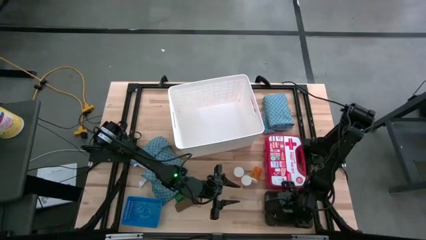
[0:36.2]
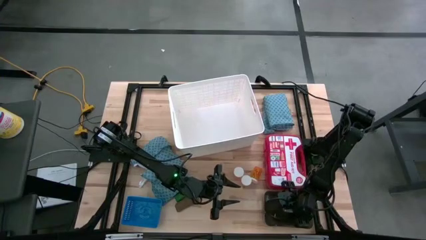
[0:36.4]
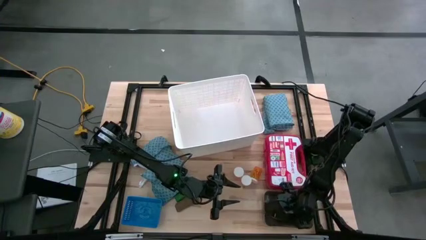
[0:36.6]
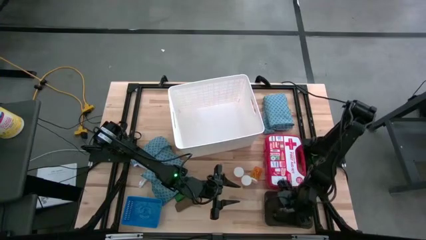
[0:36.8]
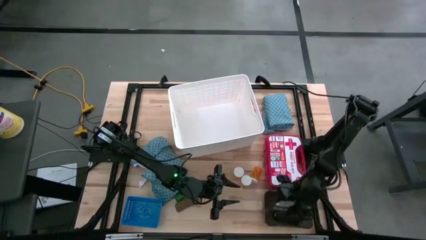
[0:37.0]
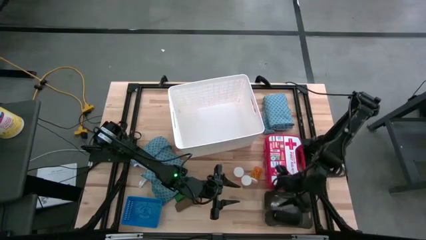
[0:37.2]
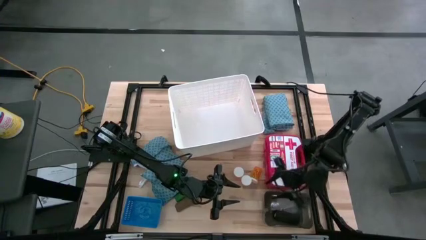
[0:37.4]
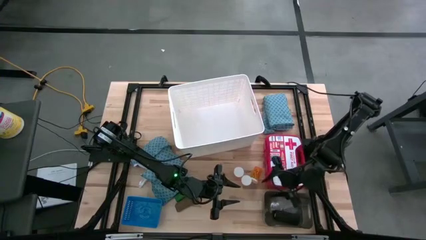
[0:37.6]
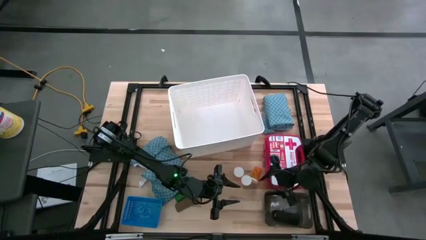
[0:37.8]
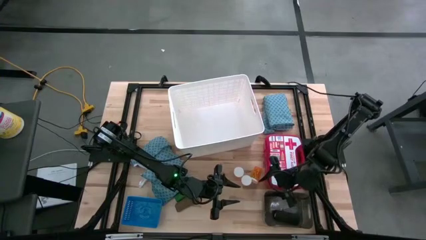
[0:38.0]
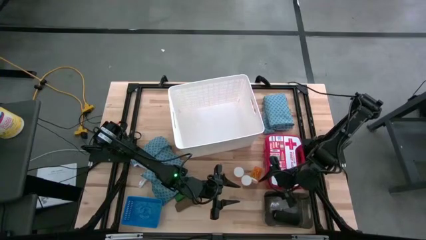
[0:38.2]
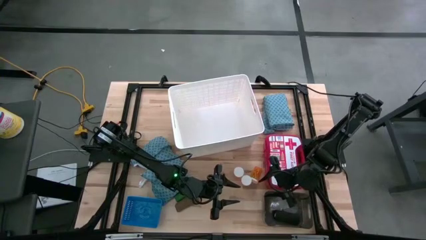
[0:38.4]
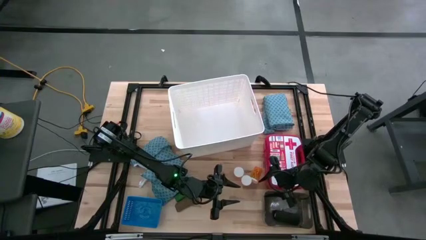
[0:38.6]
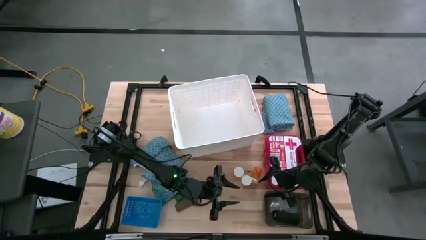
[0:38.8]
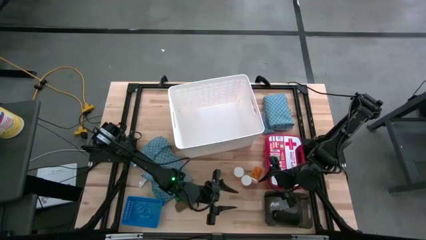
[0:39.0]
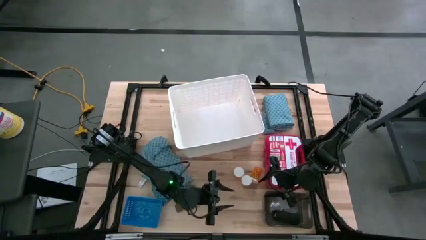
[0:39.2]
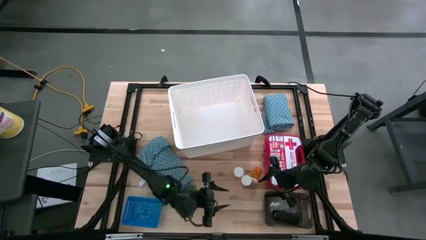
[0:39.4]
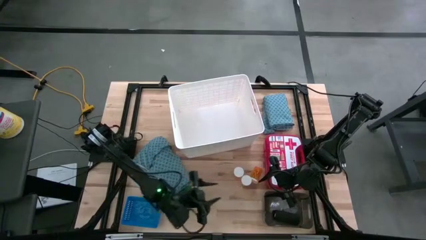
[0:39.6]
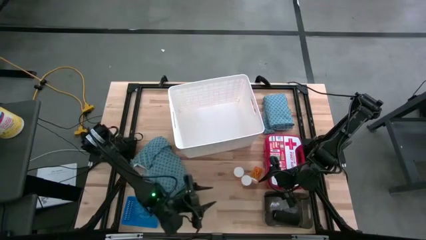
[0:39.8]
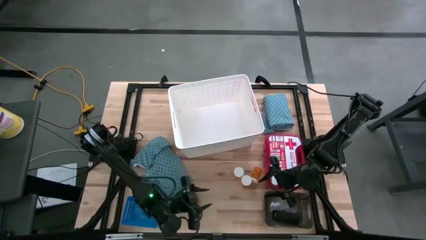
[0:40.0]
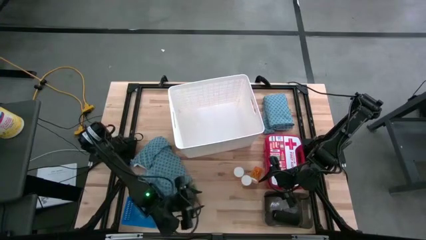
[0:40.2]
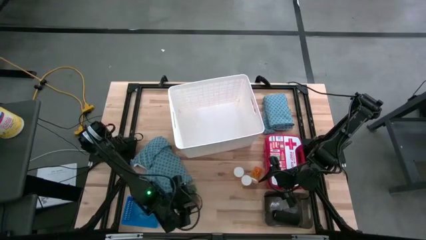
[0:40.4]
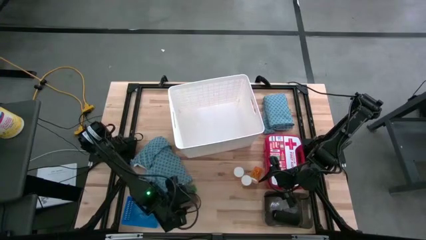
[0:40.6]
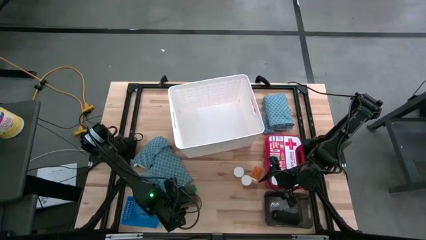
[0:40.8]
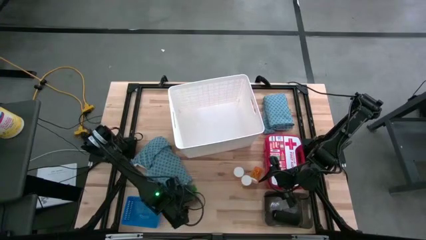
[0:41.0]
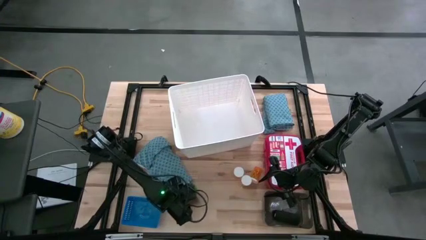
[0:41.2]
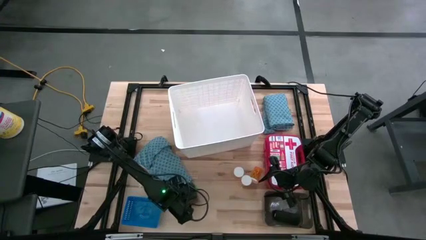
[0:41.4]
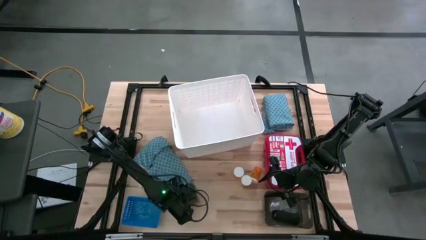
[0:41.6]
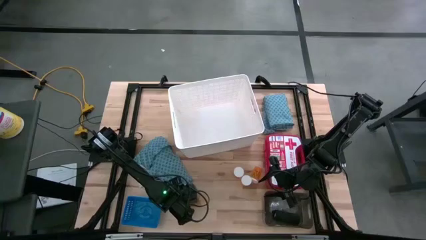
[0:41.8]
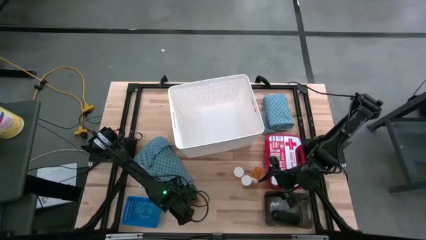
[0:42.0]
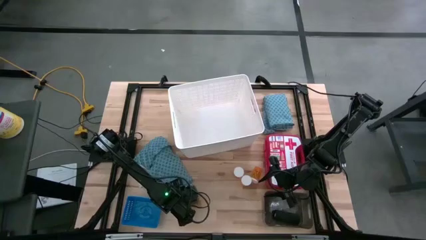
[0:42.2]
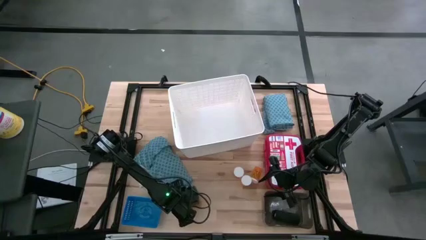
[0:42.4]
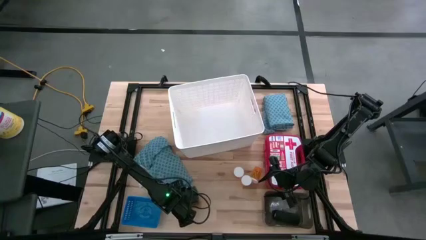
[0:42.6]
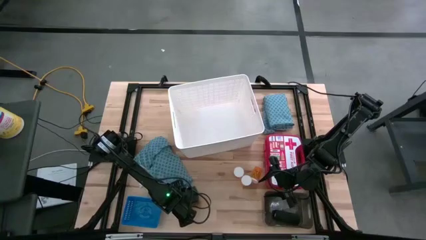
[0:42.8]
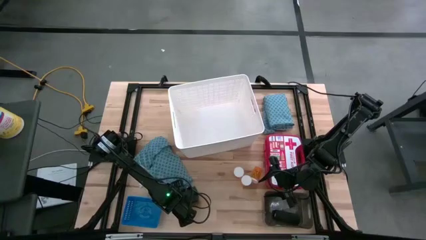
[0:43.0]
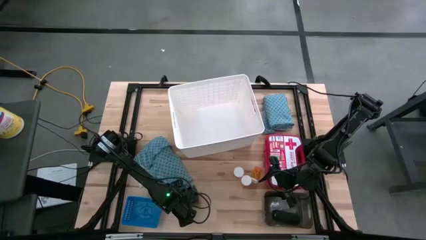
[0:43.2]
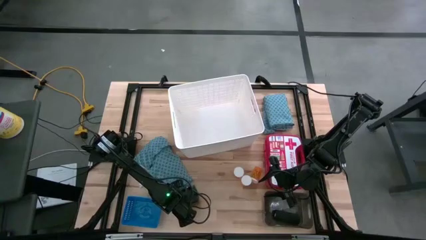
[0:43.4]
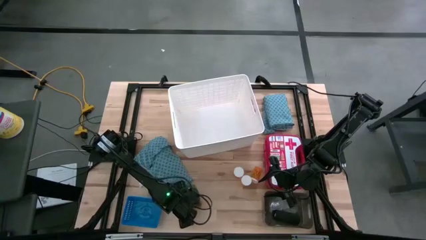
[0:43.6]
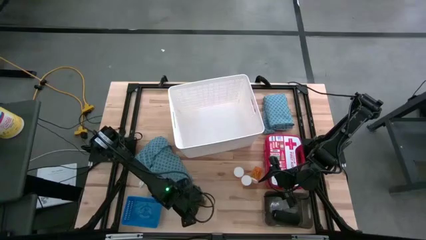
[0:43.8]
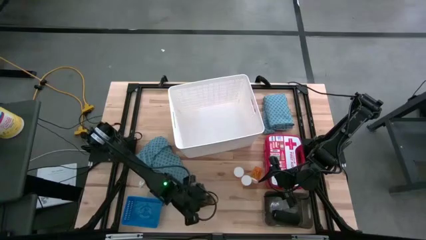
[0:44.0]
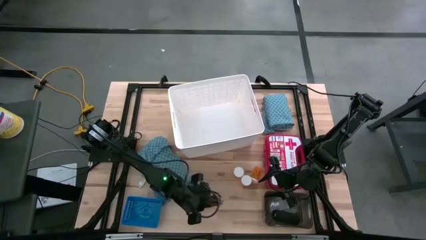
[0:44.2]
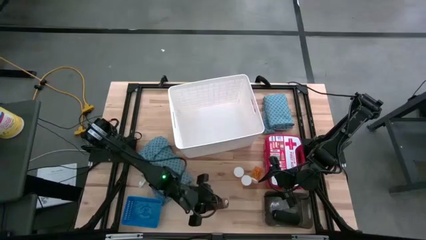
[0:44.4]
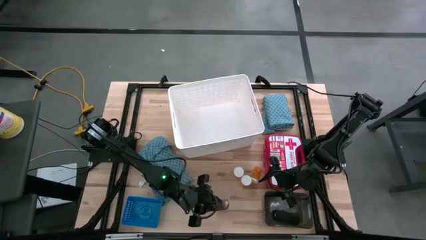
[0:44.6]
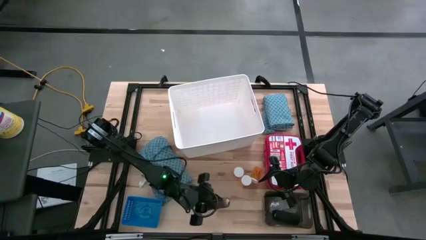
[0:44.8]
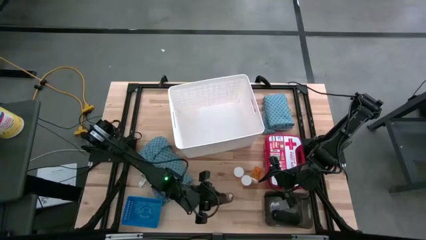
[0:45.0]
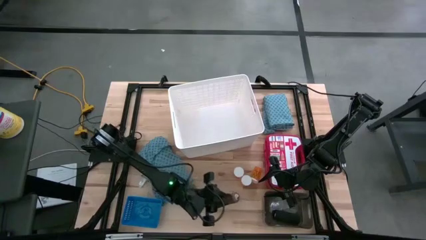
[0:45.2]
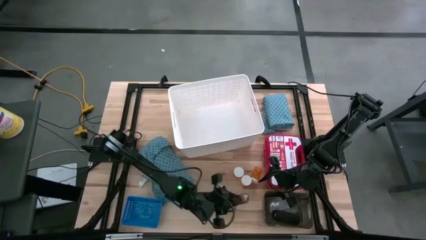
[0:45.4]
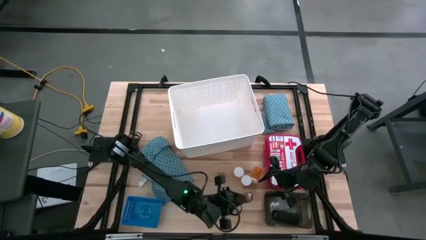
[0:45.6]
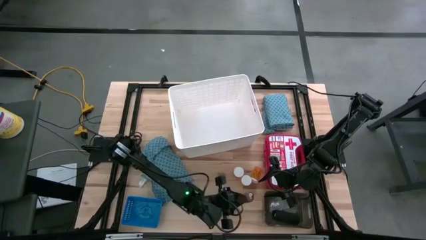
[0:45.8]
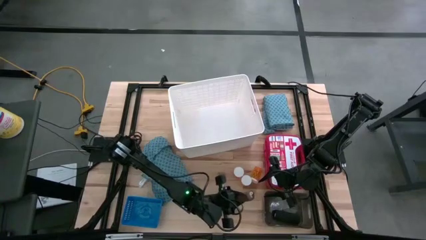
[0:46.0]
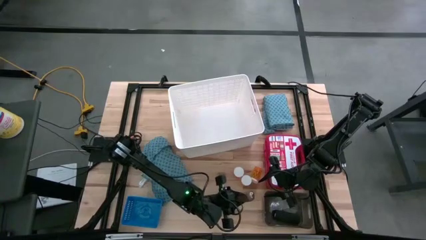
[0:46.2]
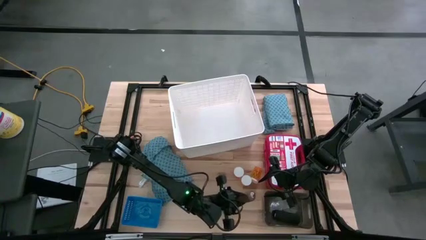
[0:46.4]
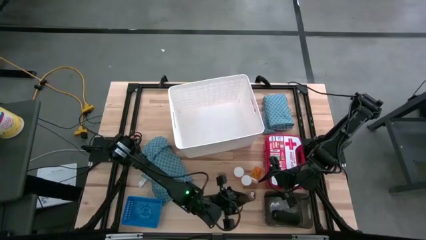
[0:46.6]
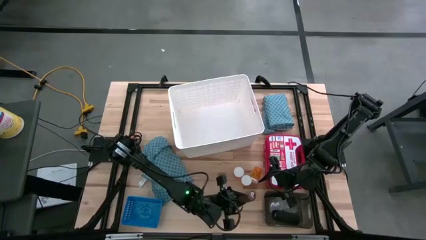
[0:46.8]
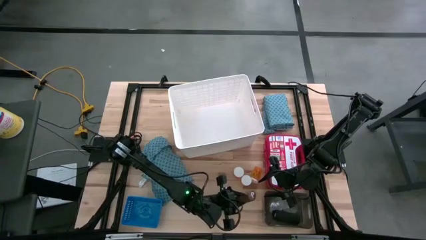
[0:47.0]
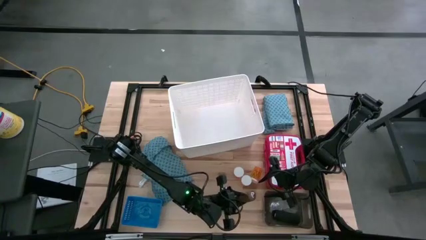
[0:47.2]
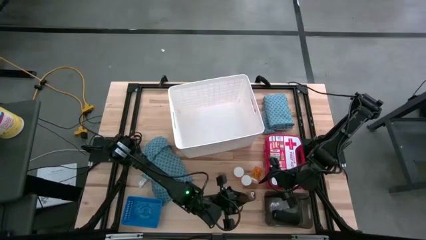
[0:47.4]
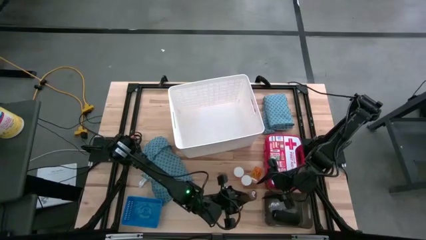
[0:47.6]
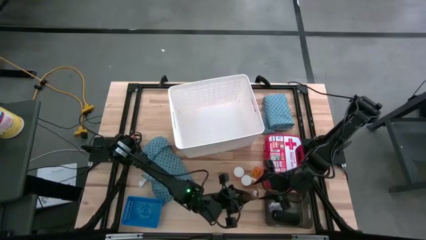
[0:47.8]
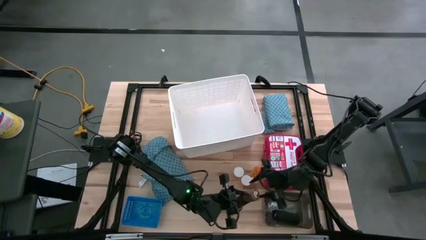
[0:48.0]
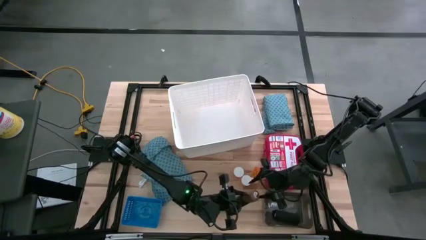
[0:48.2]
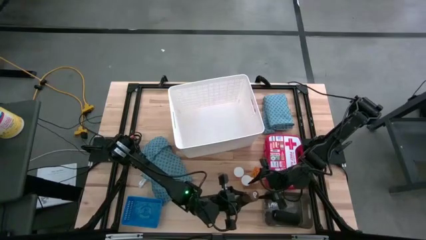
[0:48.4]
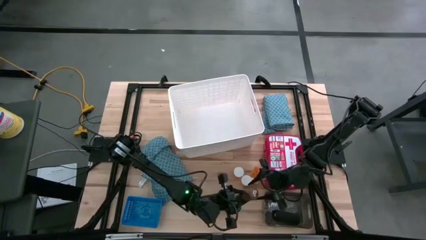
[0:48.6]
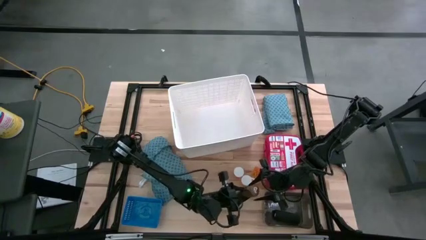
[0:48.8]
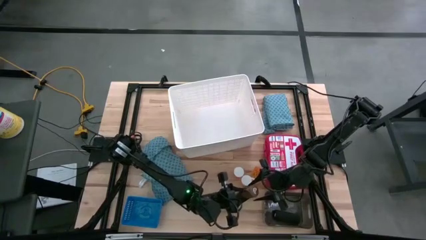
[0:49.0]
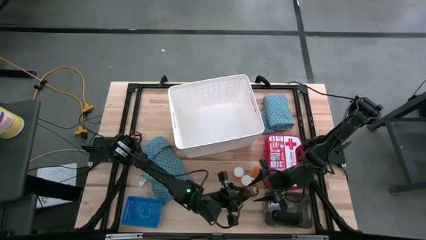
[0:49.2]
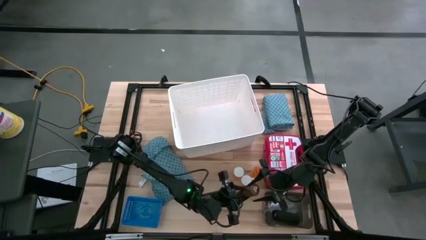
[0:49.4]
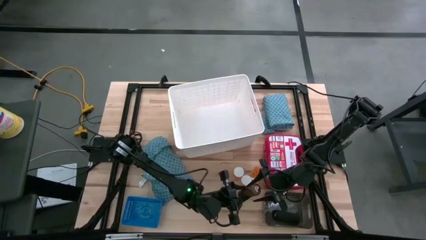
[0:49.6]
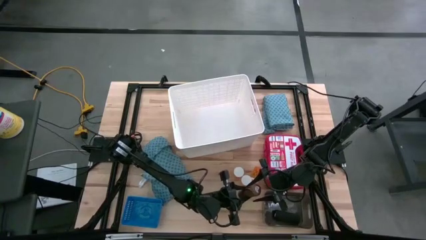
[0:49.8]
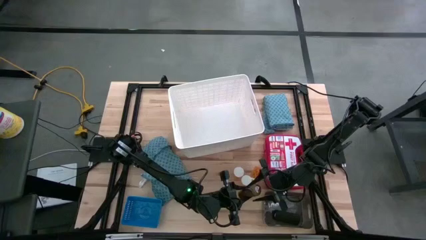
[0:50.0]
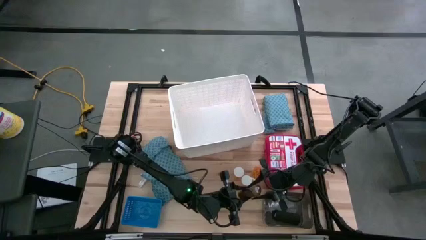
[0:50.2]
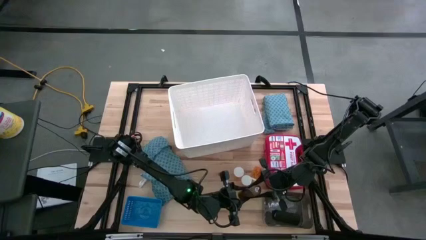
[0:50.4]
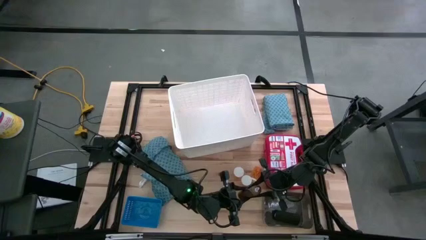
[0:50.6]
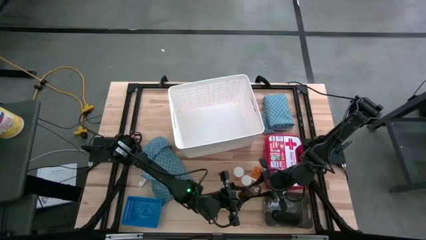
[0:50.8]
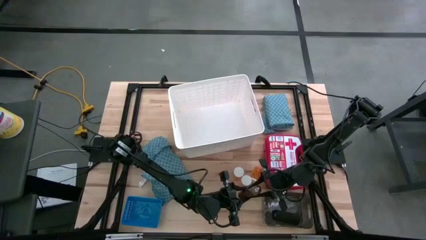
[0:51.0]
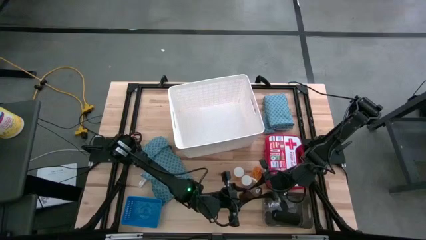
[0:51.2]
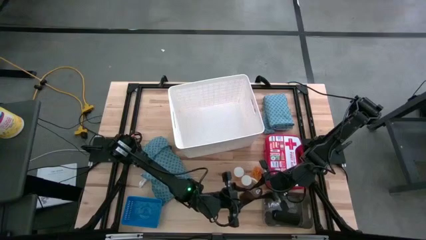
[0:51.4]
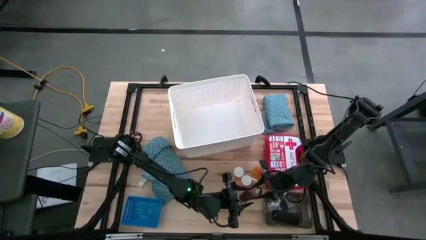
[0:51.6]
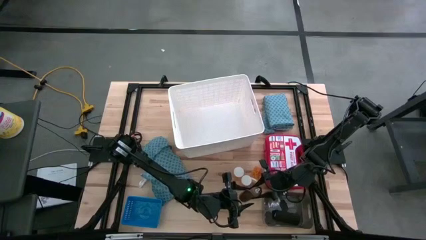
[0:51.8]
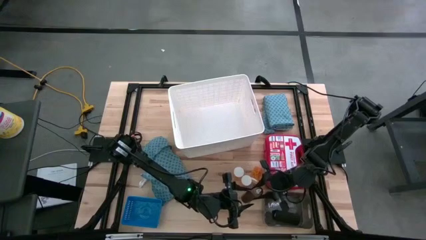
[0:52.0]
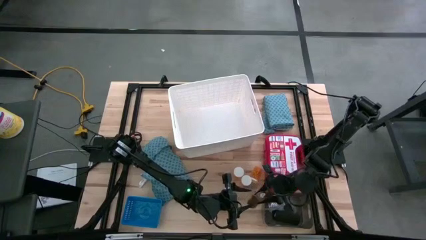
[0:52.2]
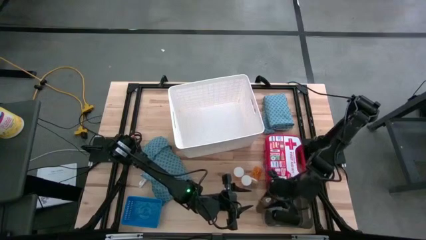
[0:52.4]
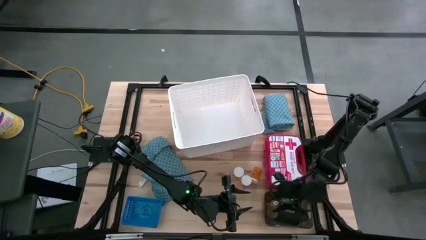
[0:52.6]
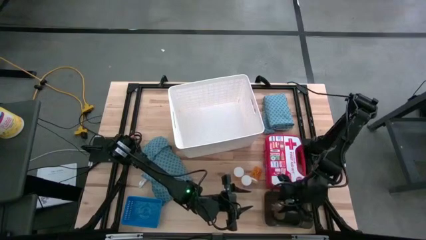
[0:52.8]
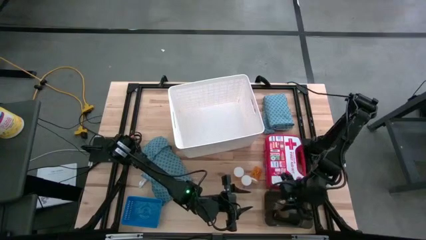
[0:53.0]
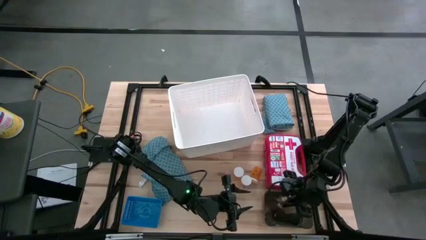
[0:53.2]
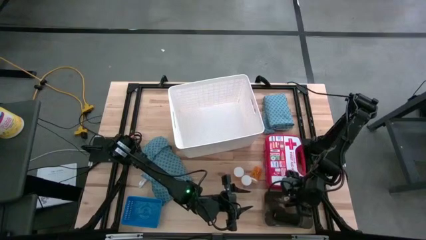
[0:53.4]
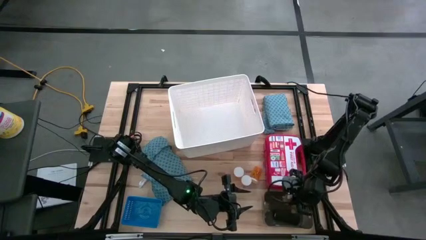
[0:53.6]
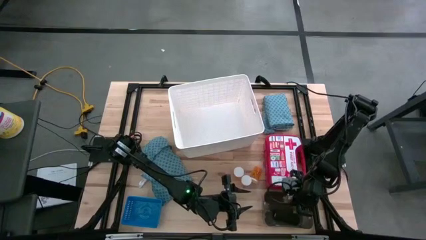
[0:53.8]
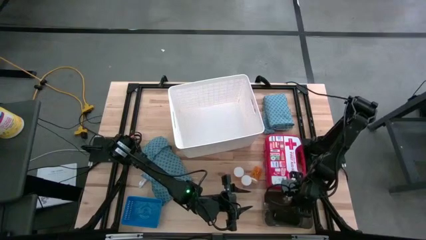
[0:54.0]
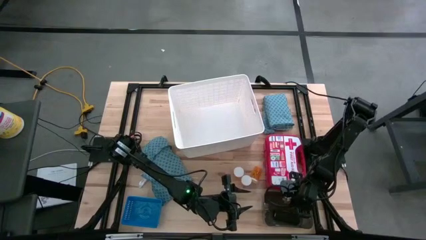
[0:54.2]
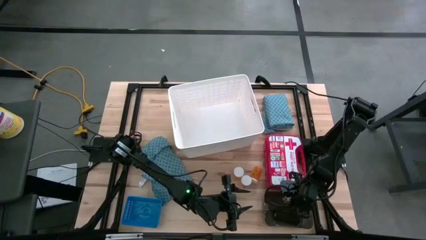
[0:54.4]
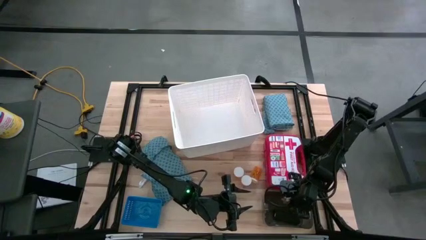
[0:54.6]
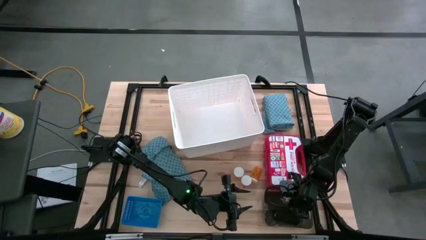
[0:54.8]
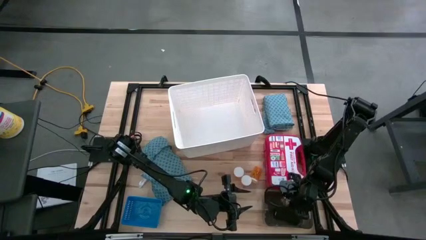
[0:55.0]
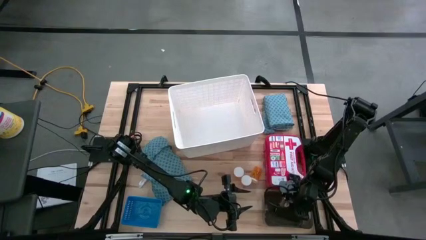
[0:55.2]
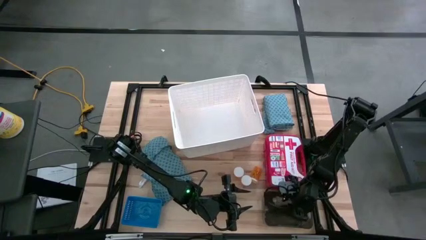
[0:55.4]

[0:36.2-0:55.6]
Task: Pick & place medical supplies in basket/bin
Put the brown bandage into the black bin
